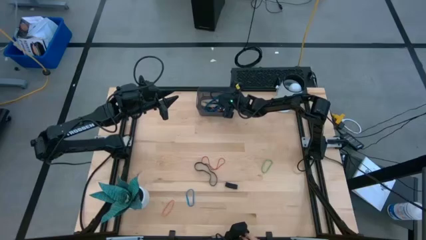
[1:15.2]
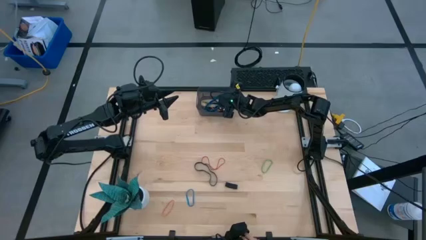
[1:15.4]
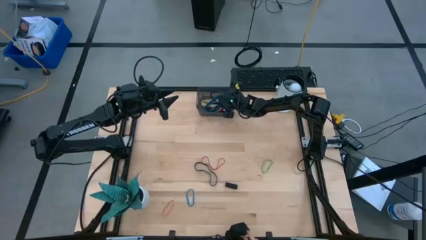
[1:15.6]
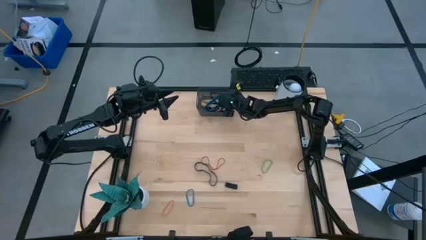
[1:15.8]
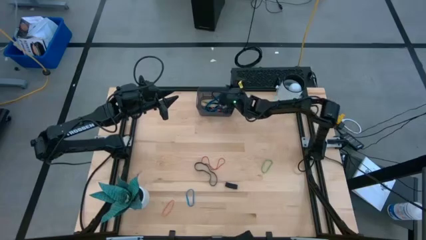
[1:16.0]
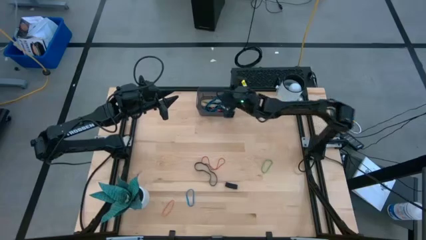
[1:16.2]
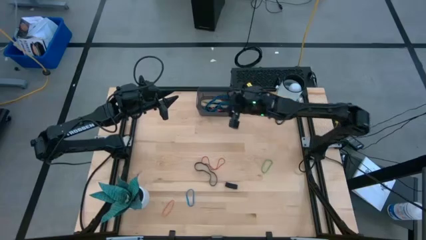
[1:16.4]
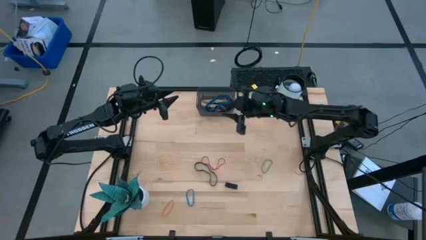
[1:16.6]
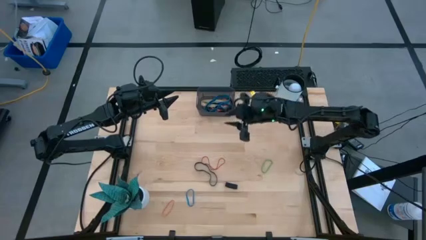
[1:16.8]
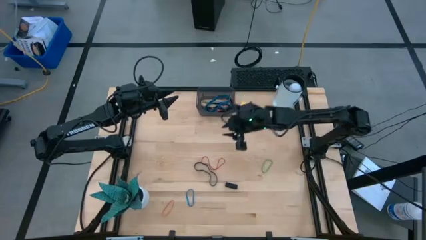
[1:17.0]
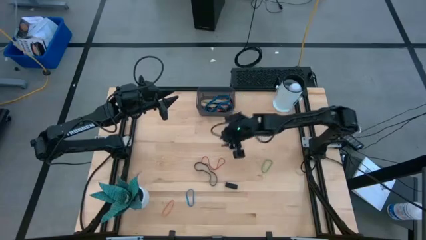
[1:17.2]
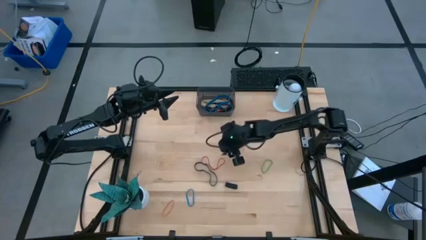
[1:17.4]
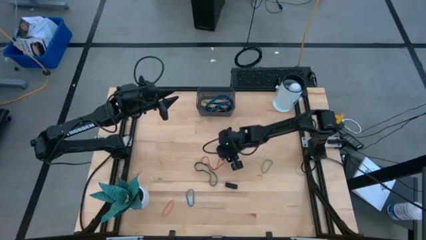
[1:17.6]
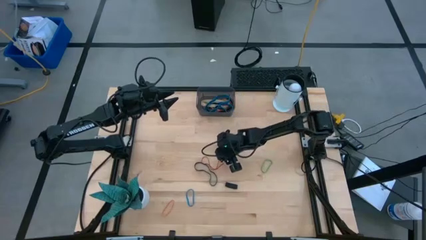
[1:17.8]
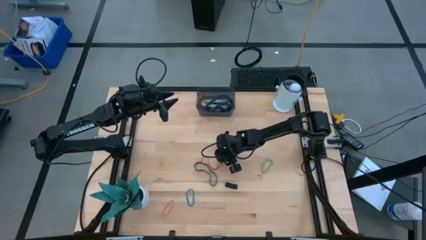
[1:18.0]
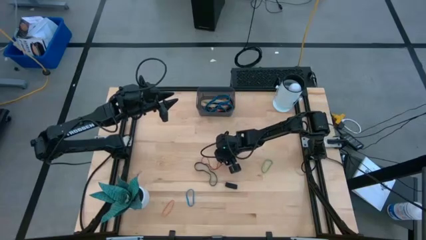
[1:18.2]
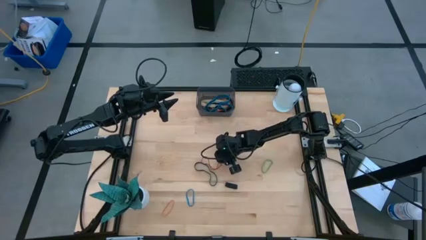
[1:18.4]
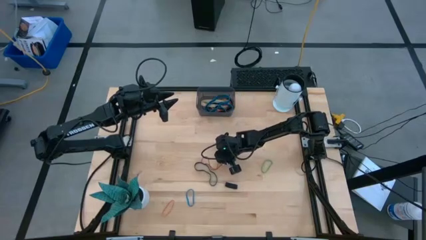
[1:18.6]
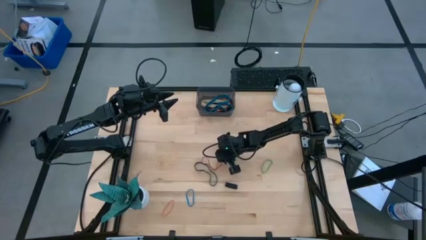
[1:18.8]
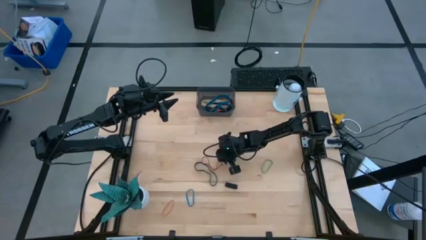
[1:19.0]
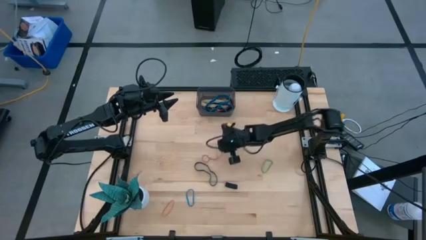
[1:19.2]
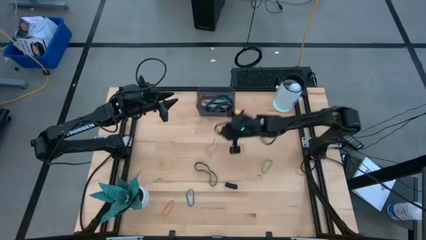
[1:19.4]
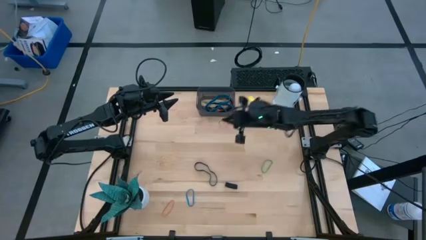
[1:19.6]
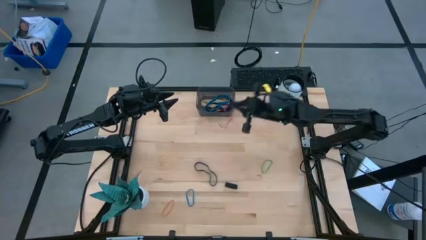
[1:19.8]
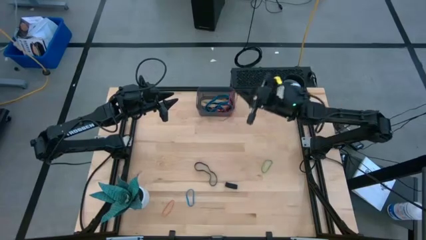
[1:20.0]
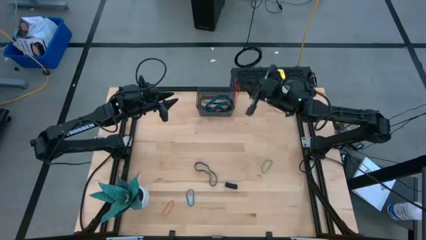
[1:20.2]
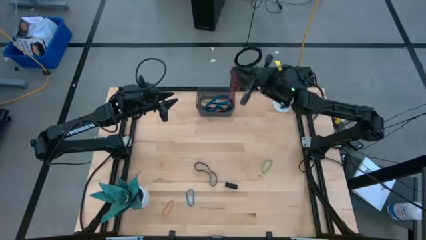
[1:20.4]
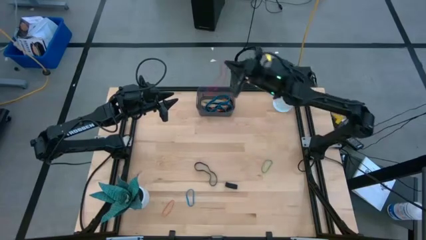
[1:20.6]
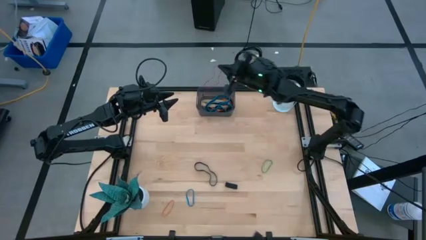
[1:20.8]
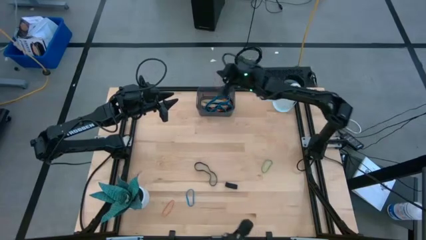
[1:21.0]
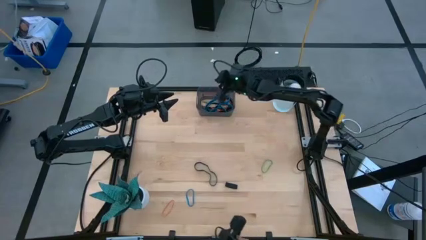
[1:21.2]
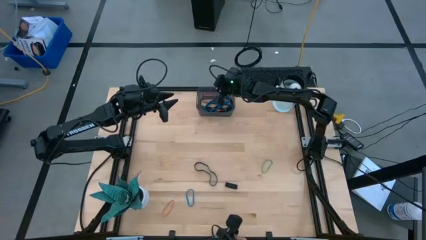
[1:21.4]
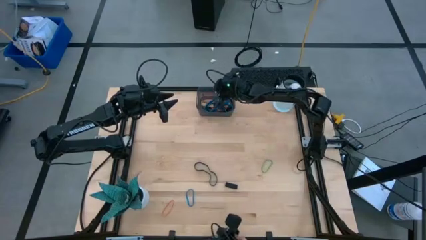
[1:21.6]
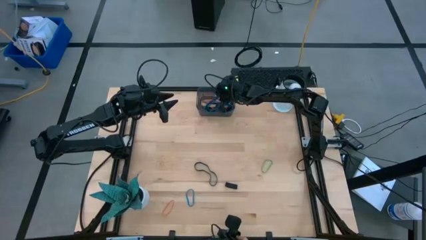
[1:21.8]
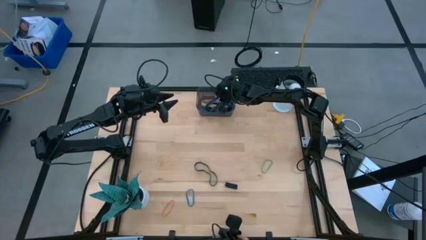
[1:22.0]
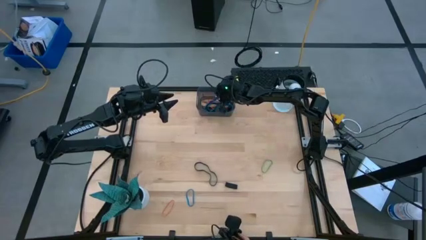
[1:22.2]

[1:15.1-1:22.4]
Task: Pick and place rubber bands into bin
Put the red rubber band into the black bin

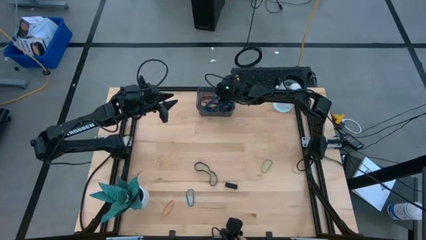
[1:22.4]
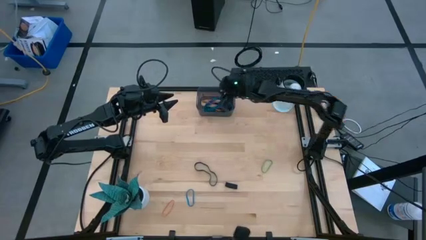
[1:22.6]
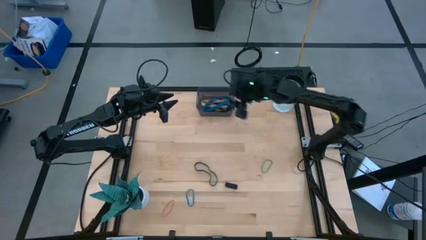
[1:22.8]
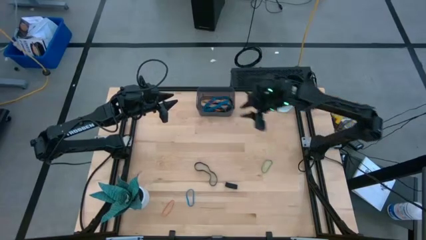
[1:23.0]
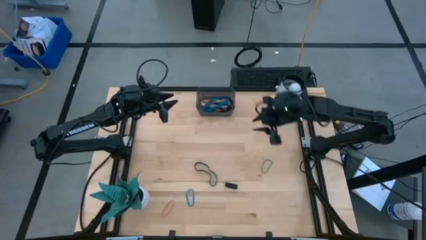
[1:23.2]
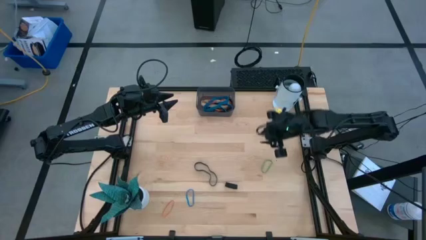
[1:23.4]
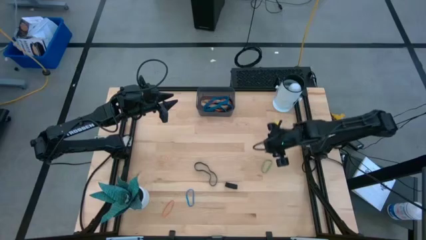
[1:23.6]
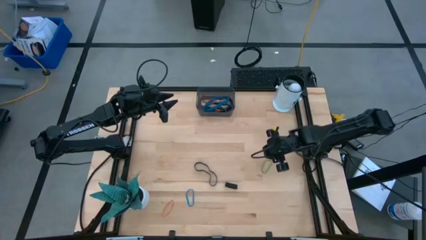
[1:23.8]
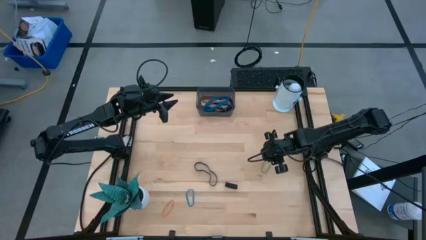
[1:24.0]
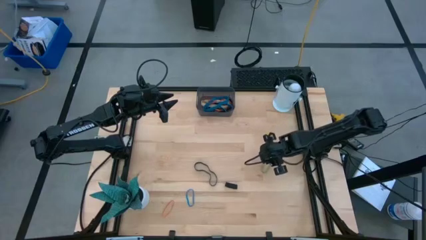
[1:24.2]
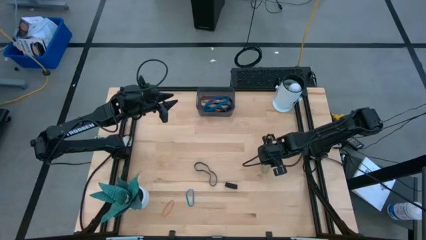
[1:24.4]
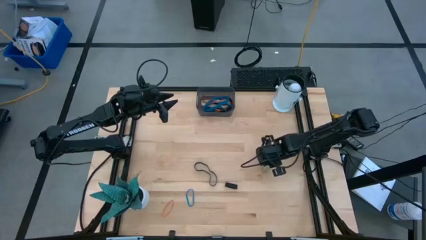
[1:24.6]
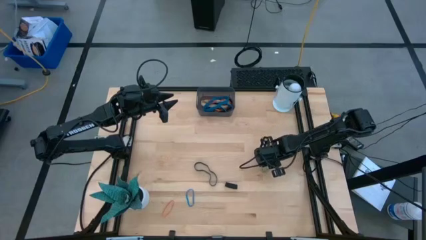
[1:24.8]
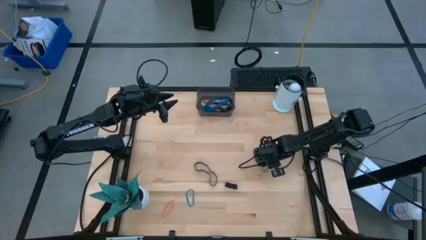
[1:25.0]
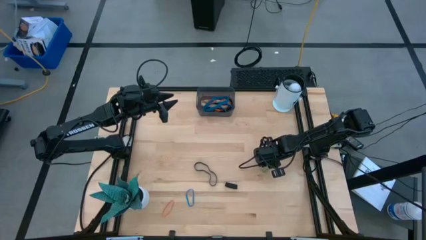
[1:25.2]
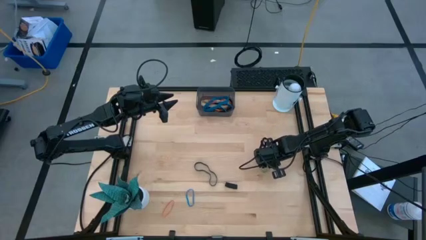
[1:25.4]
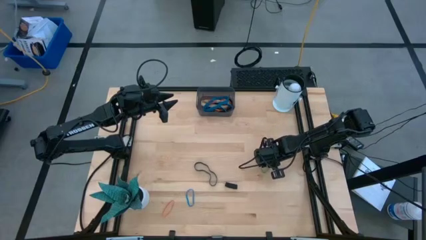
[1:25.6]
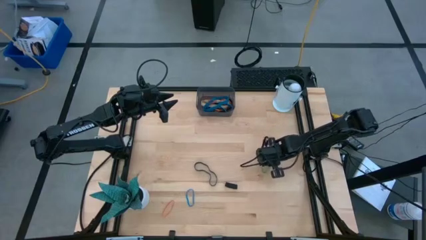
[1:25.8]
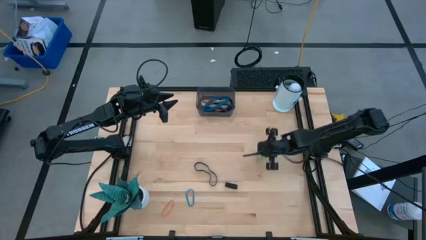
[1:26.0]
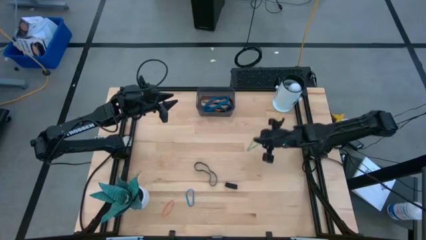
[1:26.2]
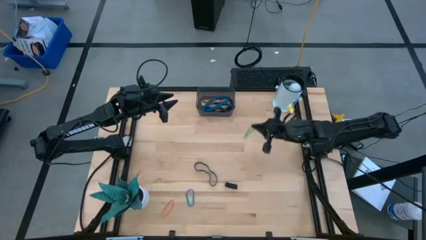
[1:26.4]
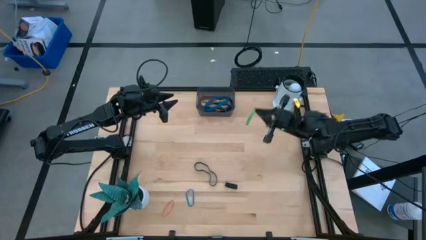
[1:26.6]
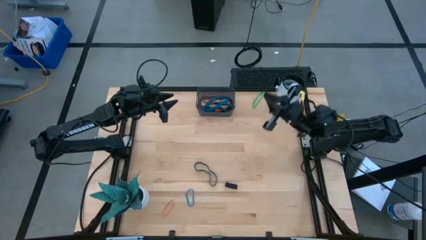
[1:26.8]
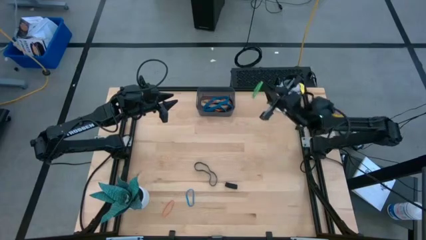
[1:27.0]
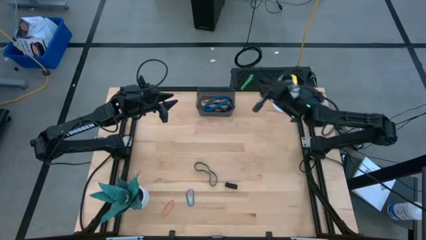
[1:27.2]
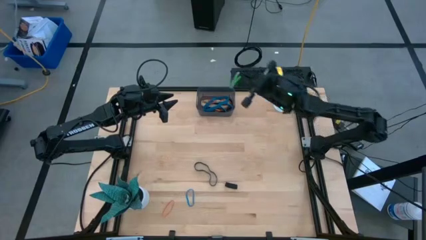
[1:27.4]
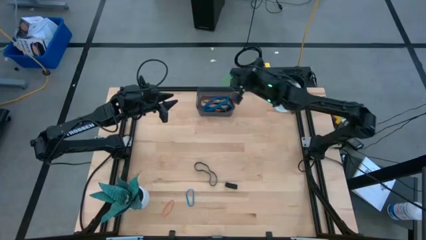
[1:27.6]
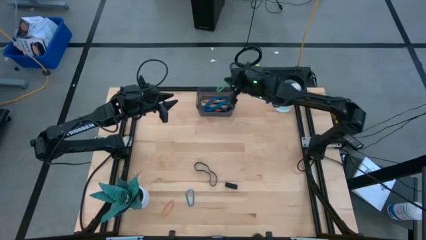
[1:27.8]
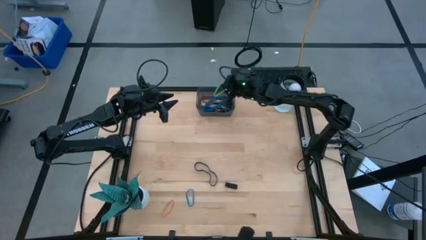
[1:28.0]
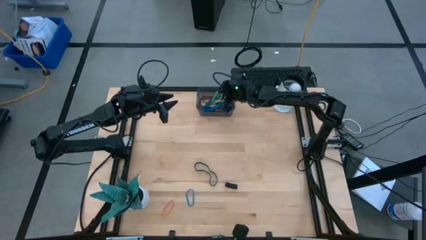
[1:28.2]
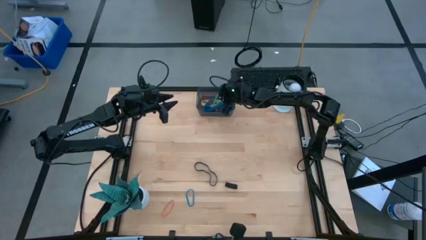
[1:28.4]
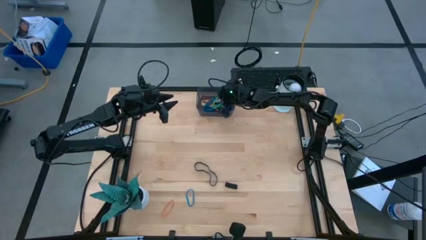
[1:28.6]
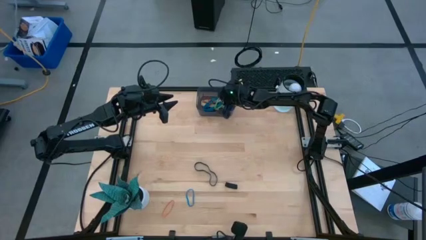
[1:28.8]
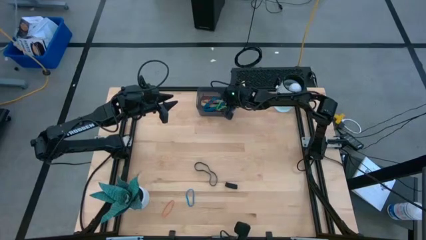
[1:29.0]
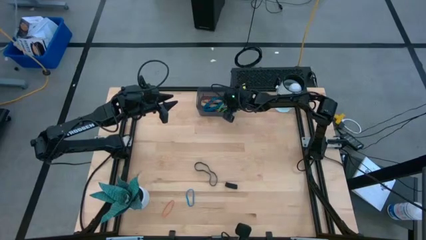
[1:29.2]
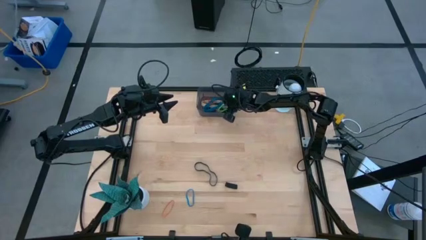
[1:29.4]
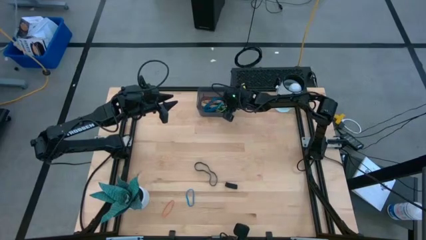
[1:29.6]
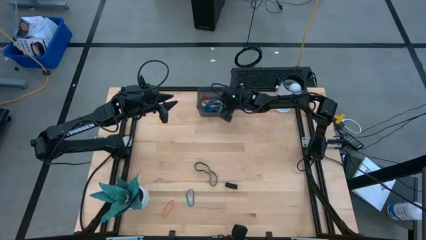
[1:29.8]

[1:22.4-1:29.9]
Put the green rubber band into the black bin
